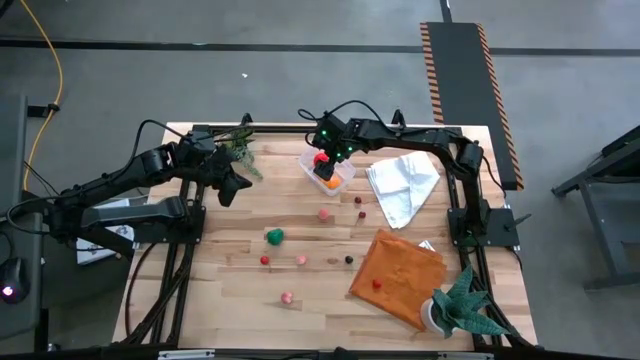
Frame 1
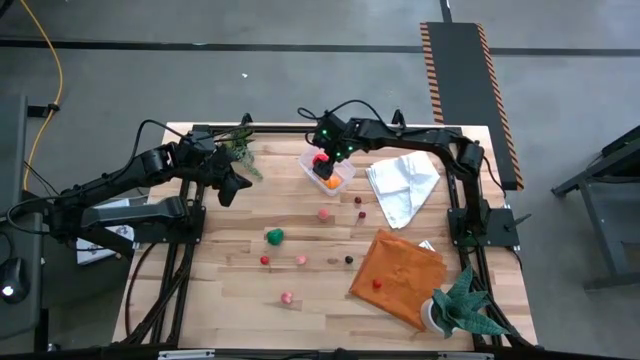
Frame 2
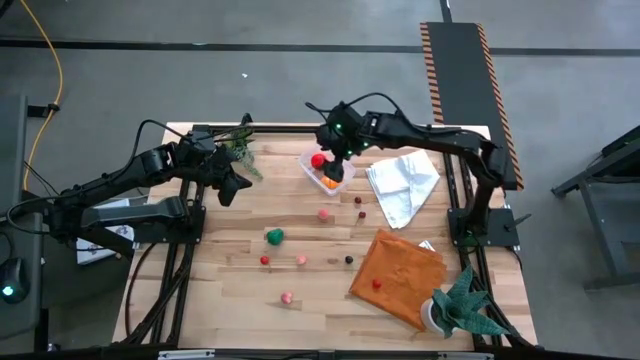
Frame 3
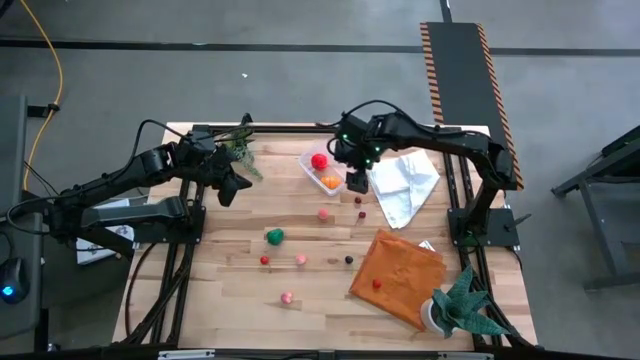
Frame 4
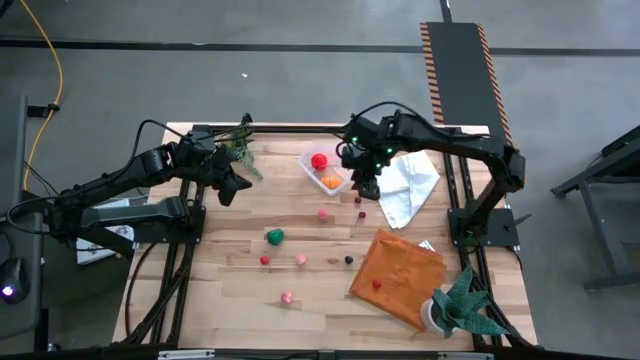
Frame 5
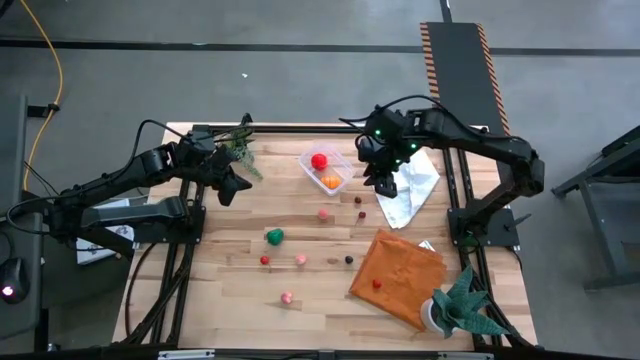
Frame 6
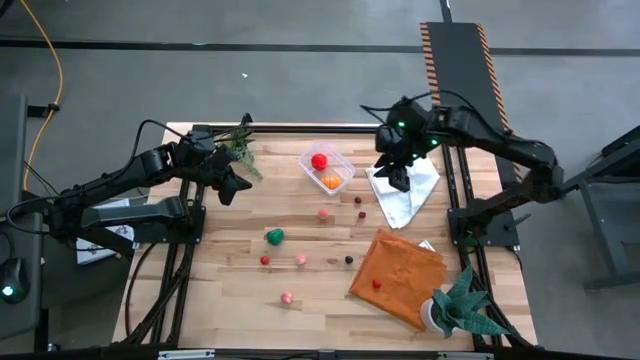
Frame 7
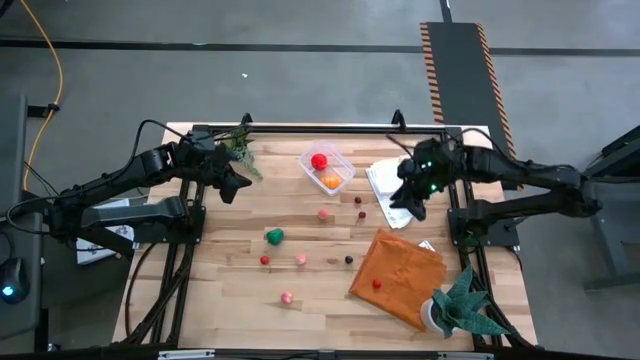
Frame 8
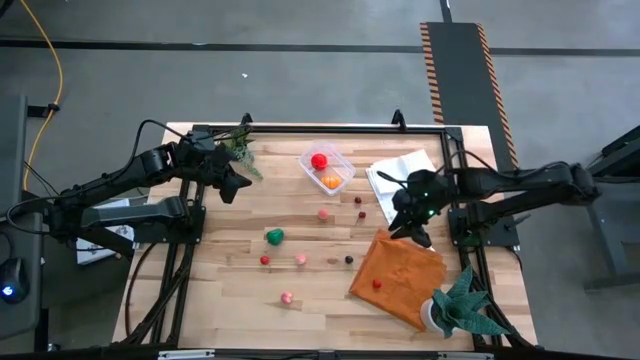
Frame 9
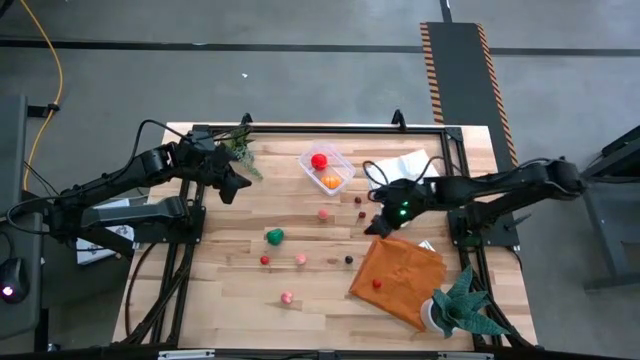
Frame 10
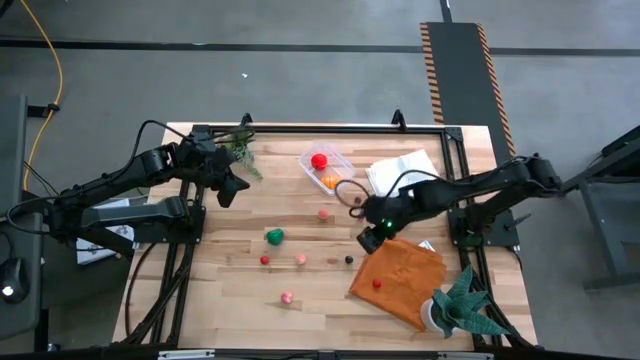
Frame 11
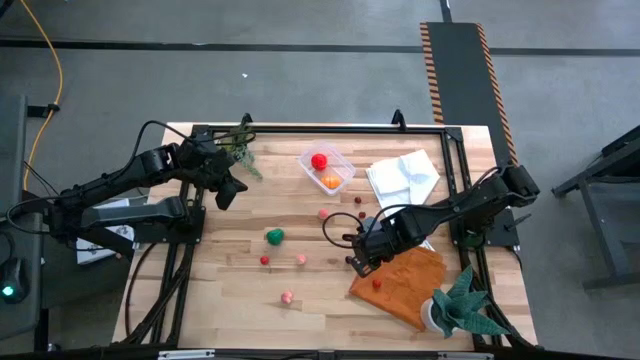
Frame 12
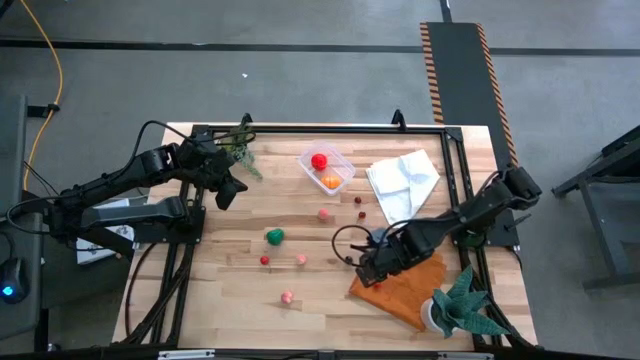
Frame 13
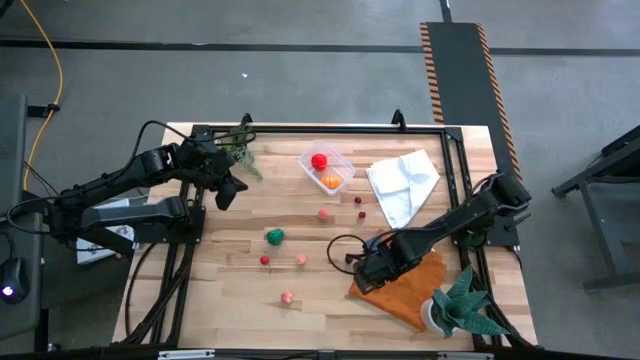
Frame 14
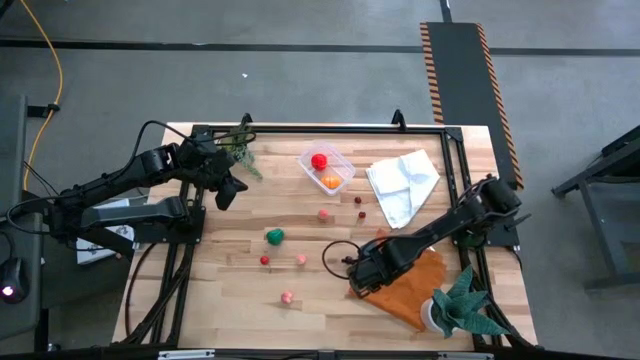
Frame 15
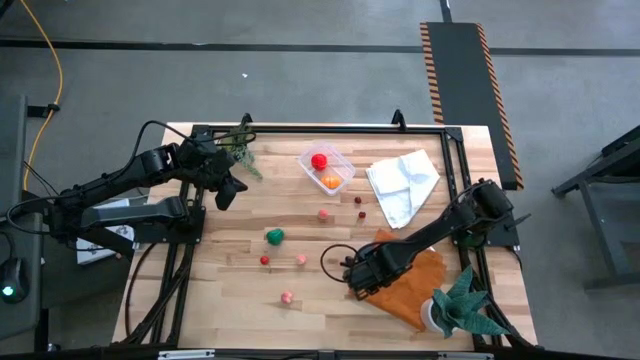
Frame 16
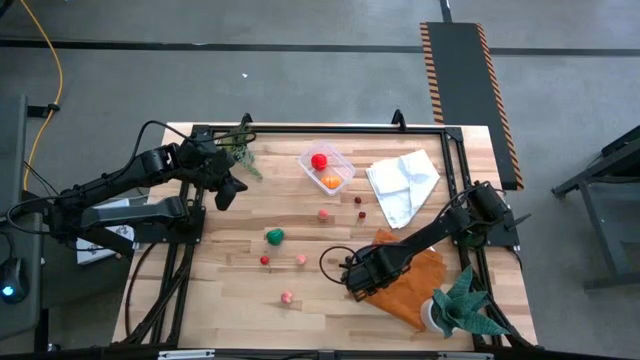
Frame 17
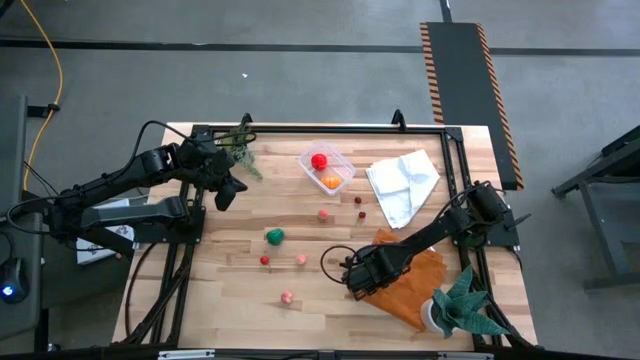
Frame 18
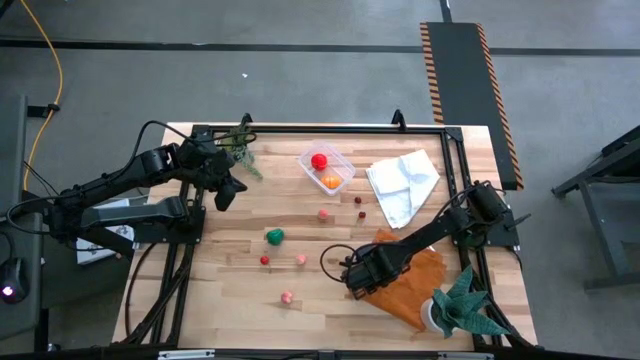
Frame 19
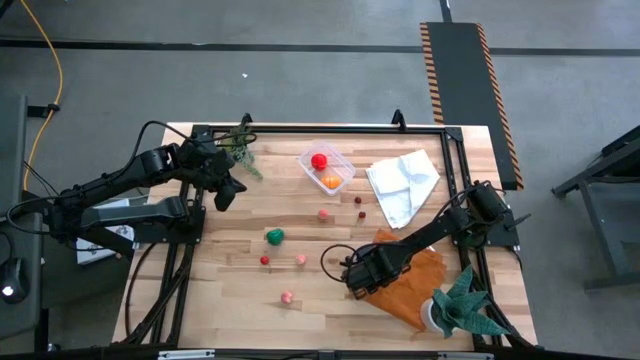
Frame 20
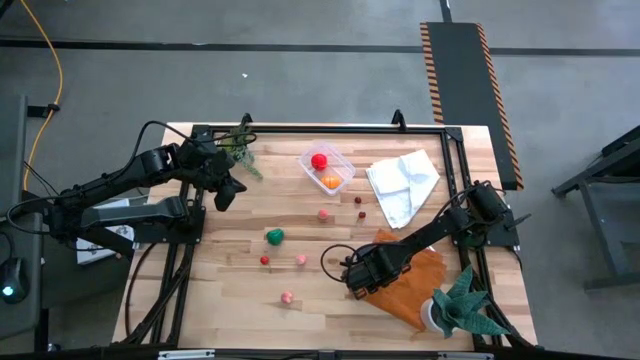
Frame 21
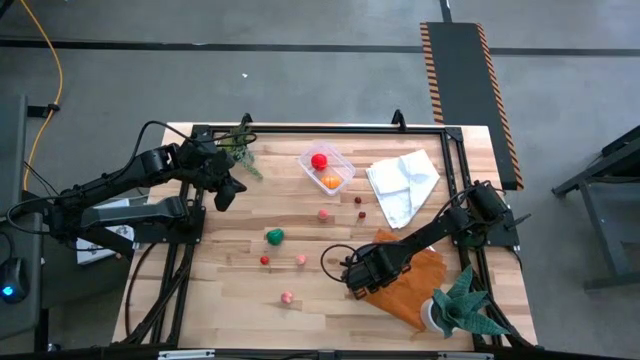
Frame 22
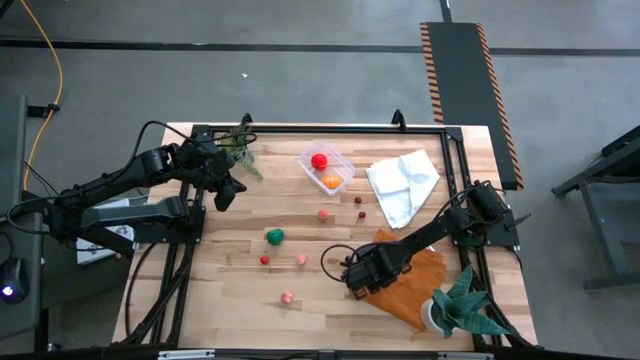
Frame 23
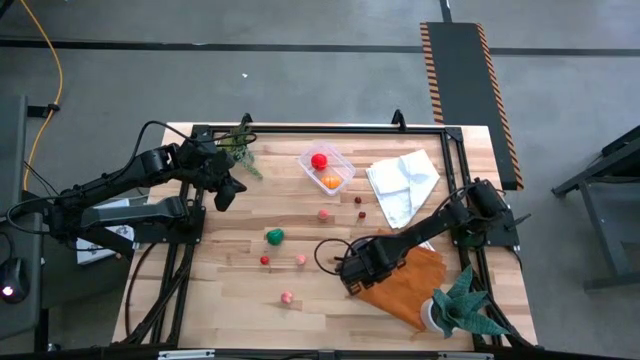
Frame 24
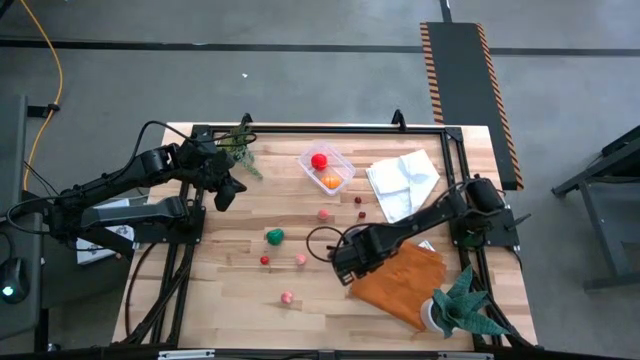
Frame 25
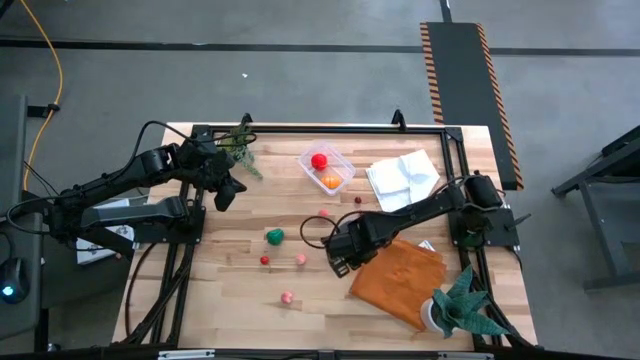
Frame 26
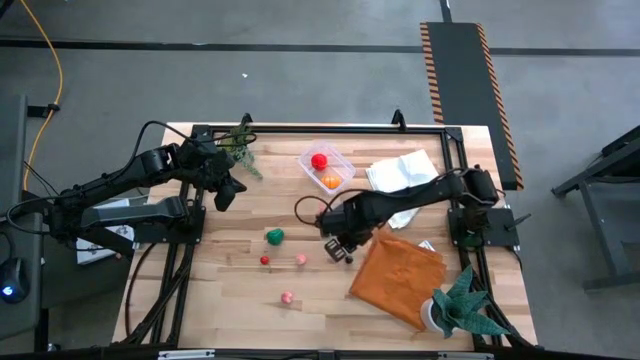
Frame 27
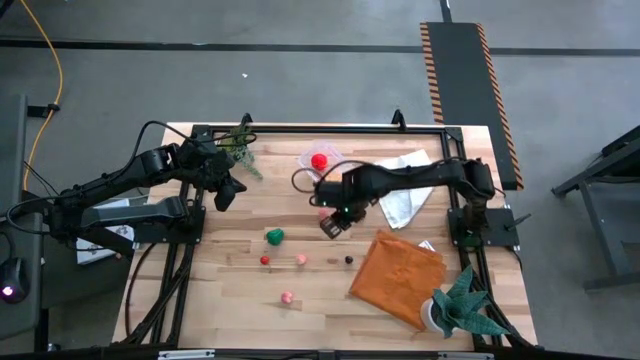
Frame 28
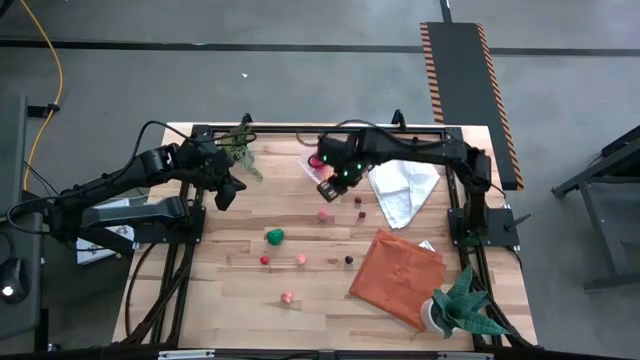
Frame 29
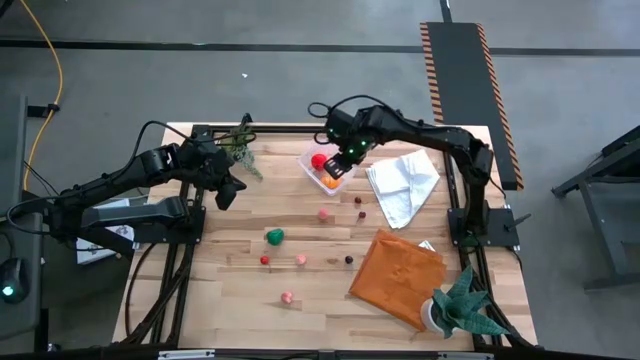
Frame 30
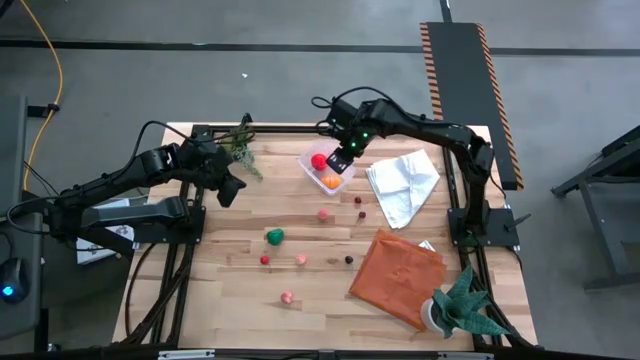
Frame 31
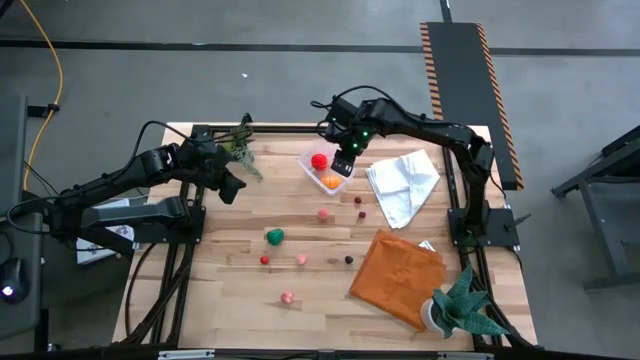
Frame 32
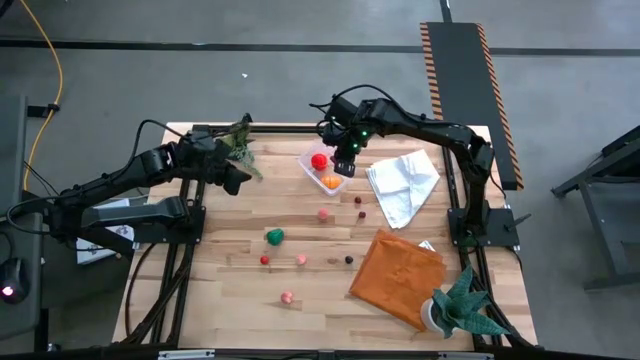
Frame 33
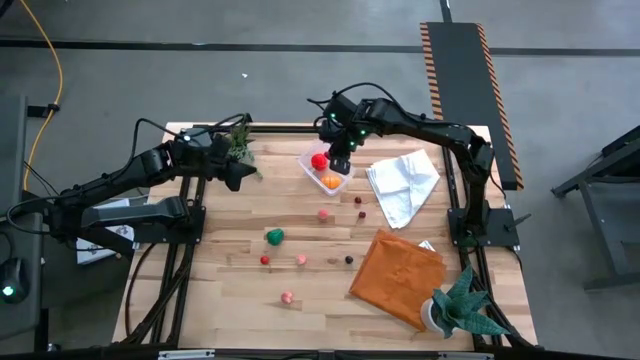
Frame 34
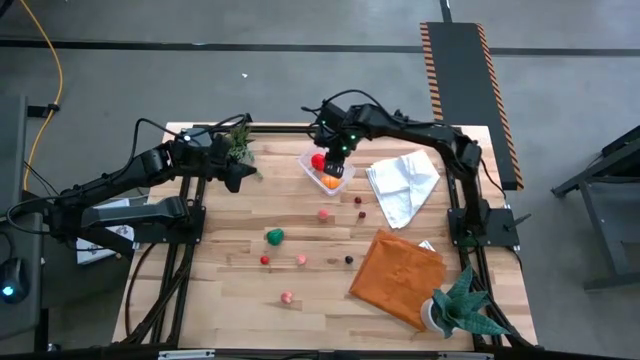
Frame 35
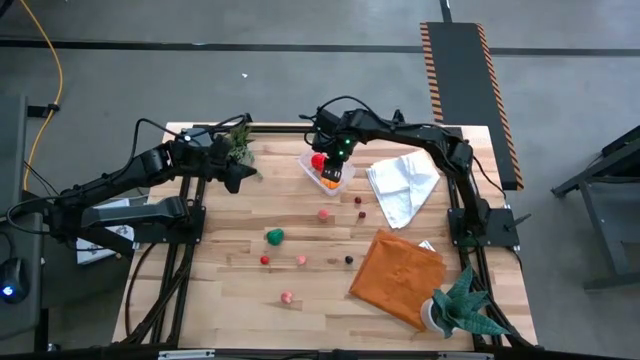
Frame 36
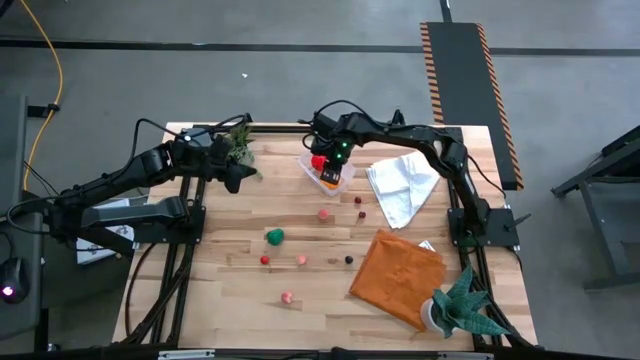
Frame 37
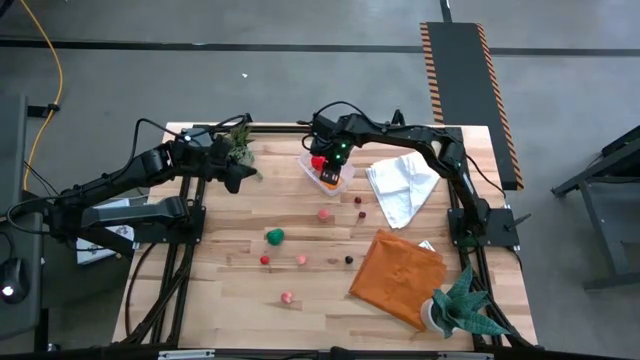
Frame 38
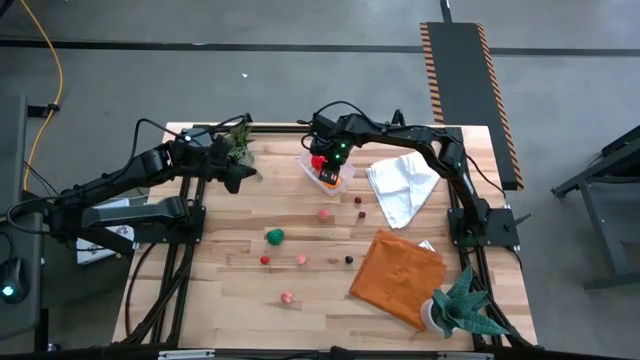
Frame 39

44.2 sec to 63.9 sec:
Task: Pick and placing Produce into tupperware
Put the red raspberry into the transparent bin

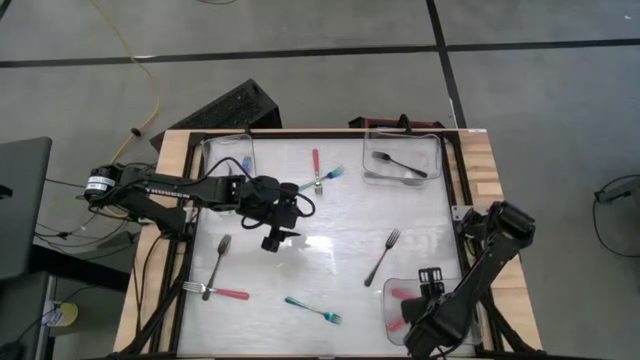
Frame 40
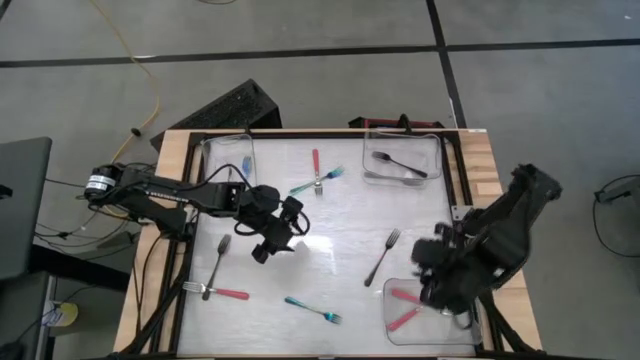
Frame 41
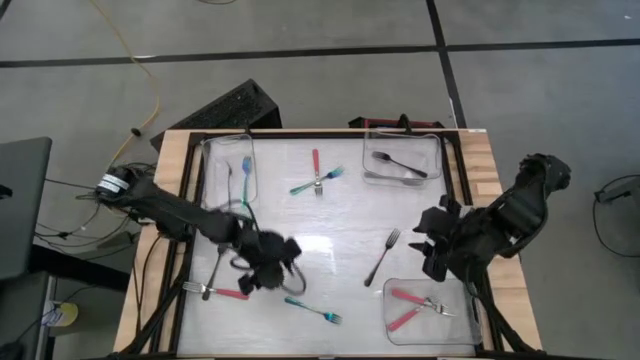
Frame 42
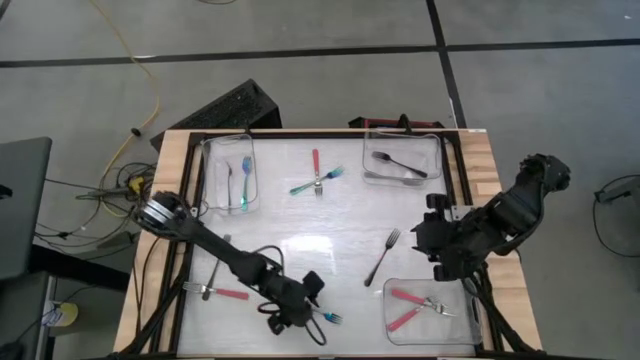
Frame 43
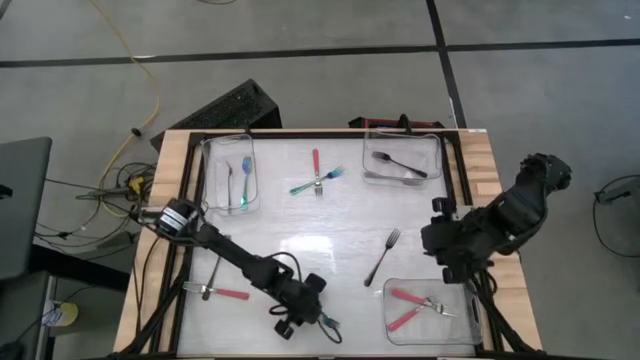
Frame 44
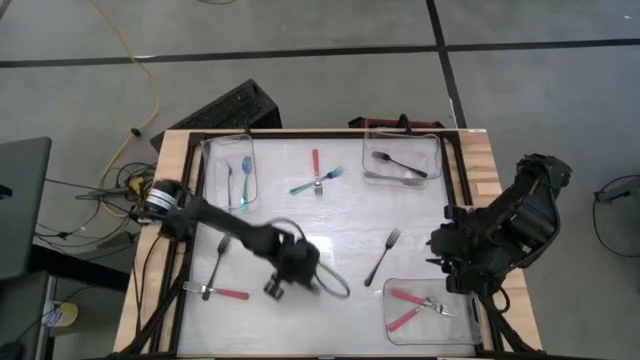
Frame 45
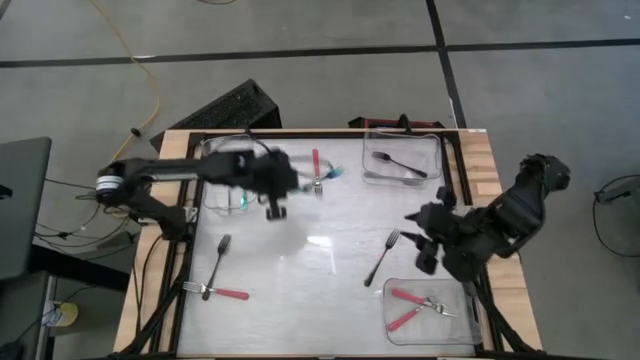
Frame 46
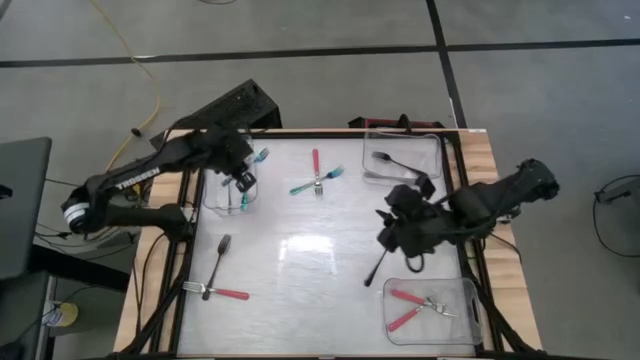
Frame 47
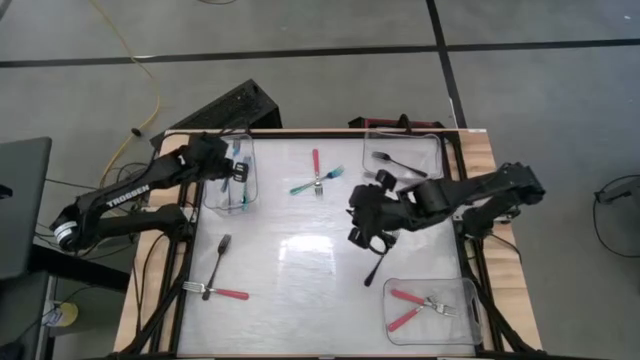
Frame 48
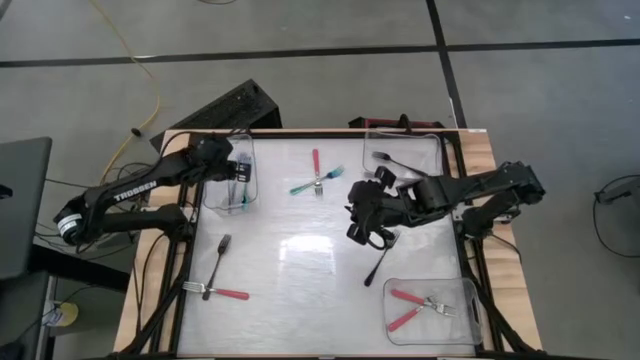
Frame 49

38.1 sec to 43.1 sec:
Task: Sort silverware by color (type)
Put the blue fork into the left transparent bin
